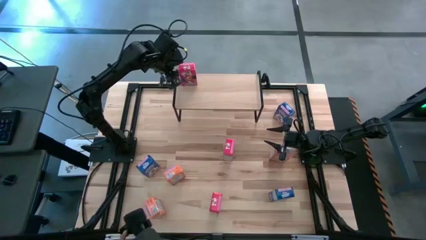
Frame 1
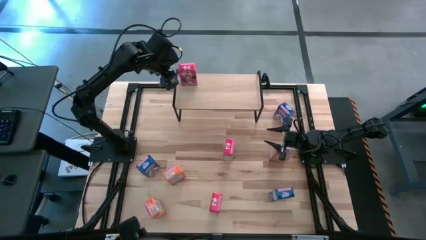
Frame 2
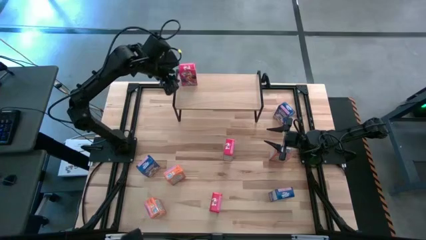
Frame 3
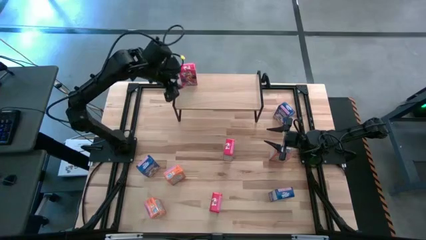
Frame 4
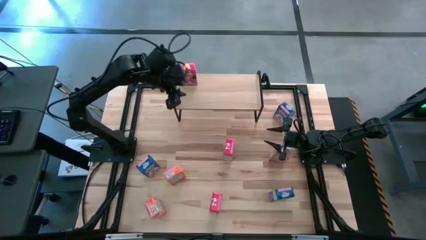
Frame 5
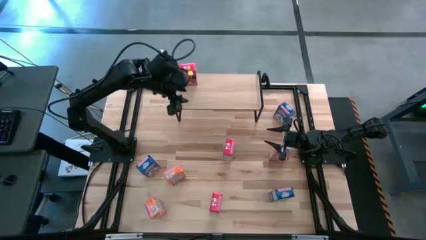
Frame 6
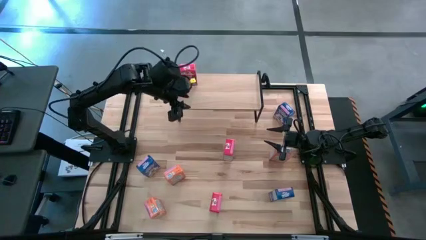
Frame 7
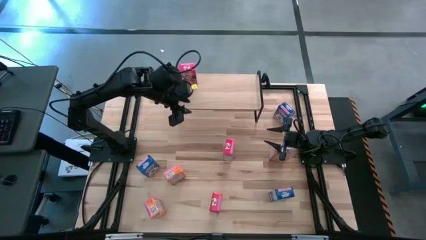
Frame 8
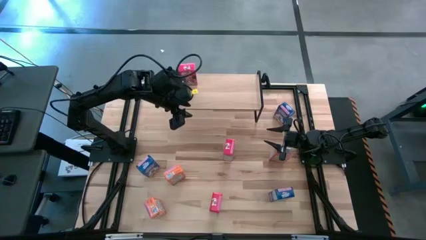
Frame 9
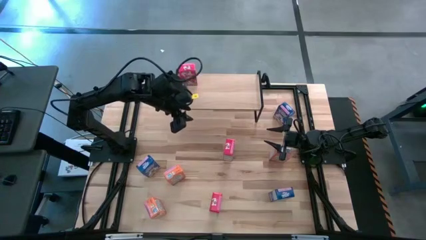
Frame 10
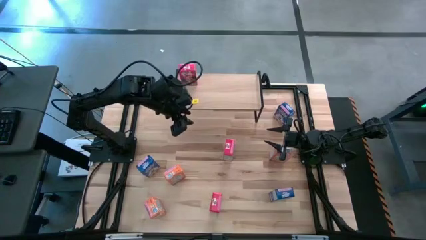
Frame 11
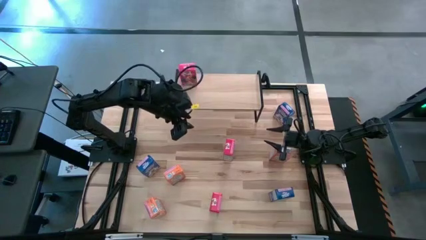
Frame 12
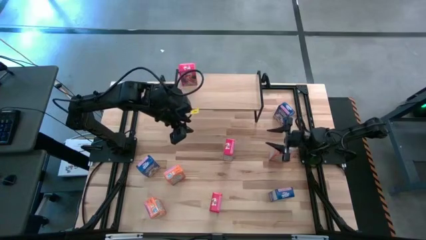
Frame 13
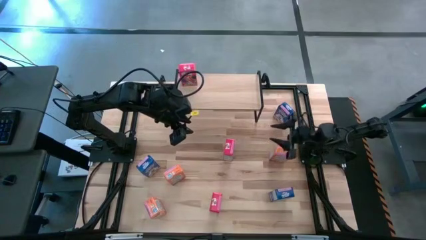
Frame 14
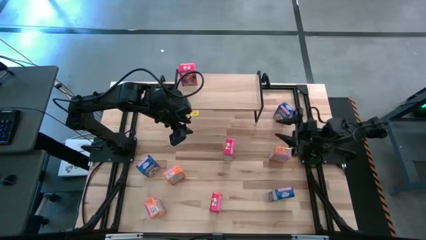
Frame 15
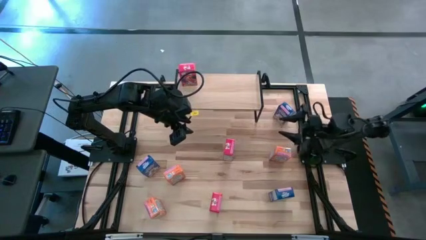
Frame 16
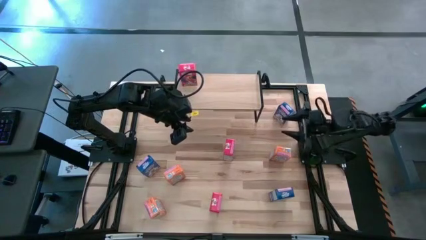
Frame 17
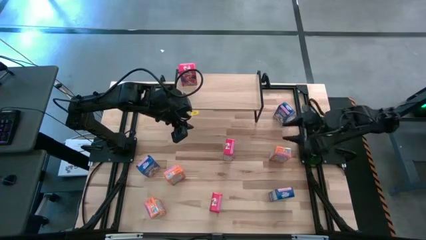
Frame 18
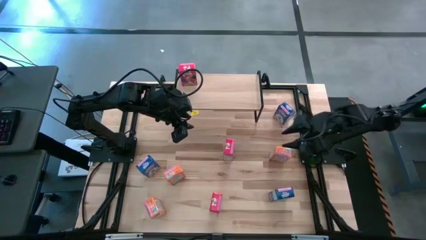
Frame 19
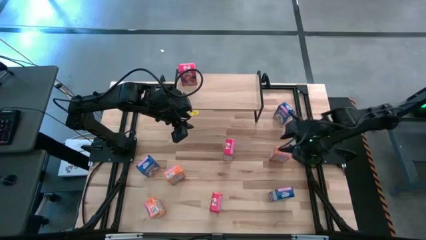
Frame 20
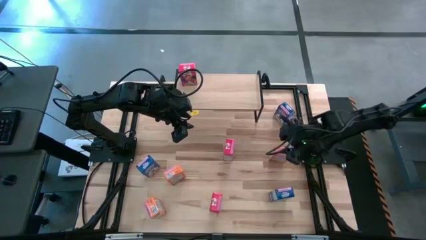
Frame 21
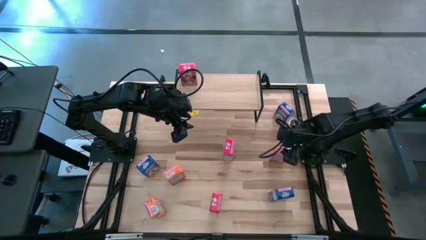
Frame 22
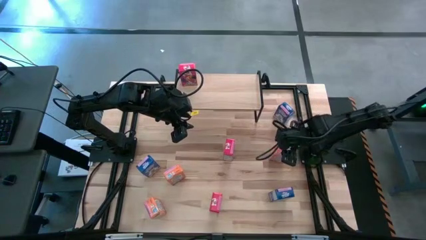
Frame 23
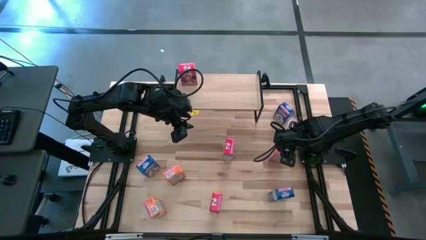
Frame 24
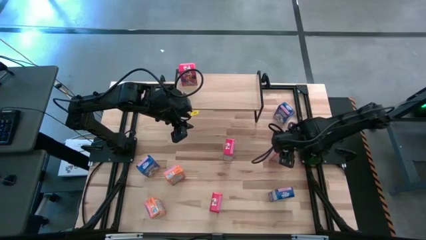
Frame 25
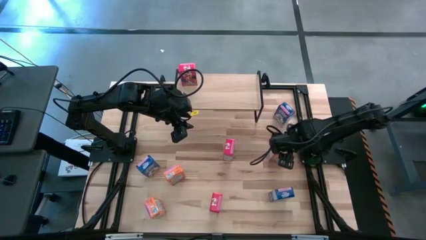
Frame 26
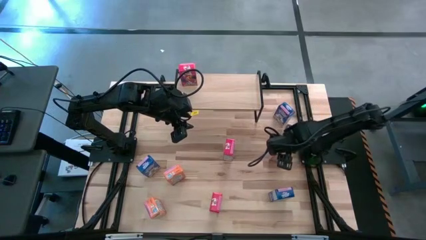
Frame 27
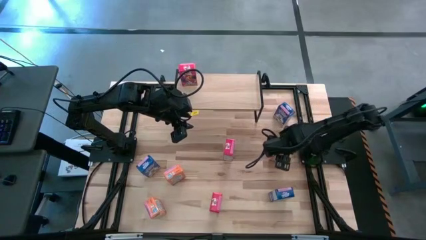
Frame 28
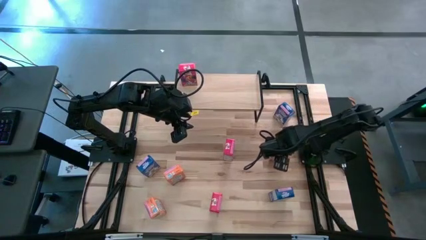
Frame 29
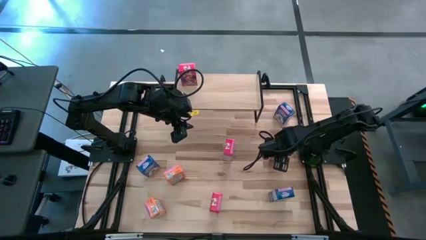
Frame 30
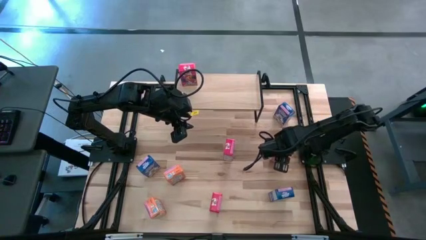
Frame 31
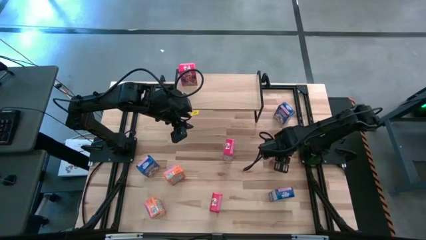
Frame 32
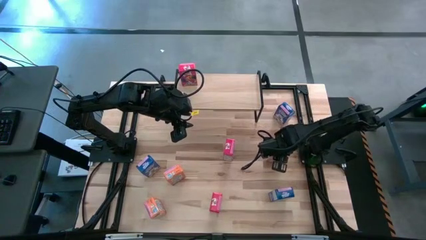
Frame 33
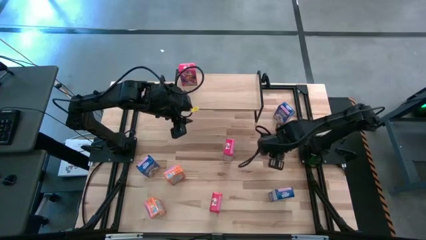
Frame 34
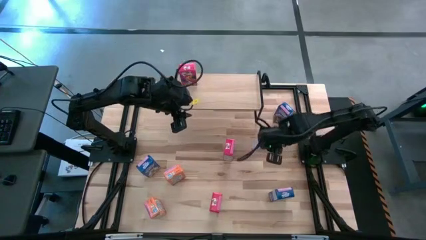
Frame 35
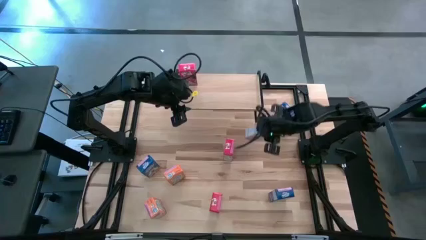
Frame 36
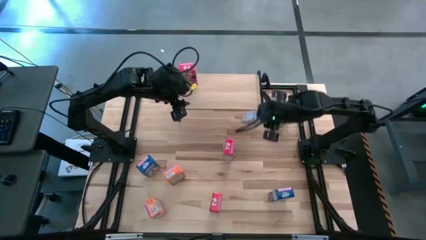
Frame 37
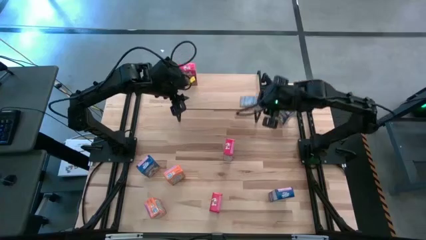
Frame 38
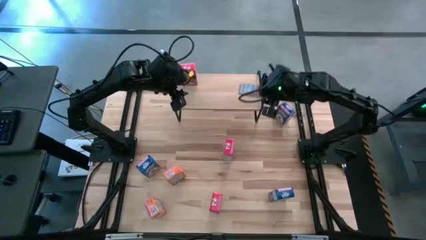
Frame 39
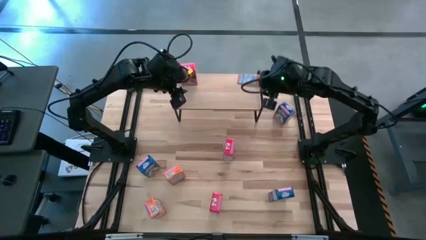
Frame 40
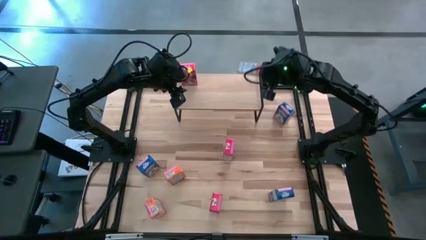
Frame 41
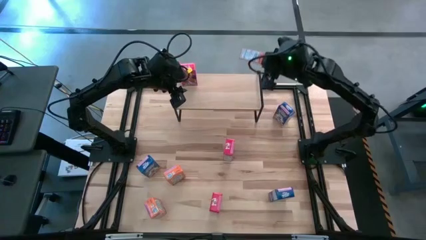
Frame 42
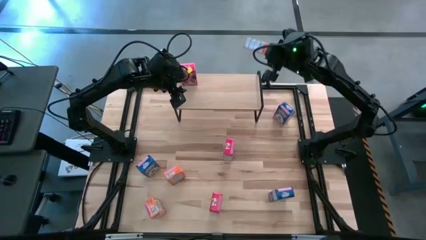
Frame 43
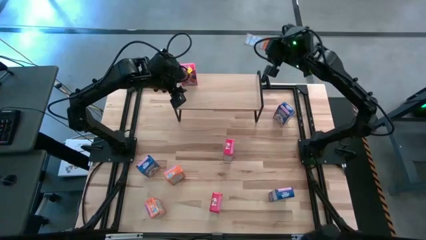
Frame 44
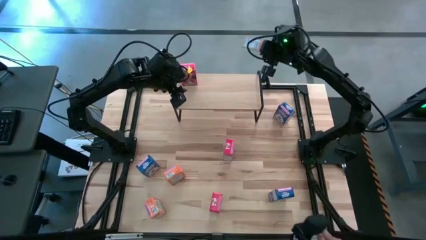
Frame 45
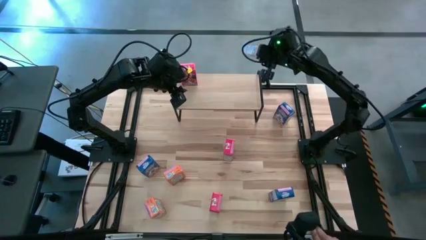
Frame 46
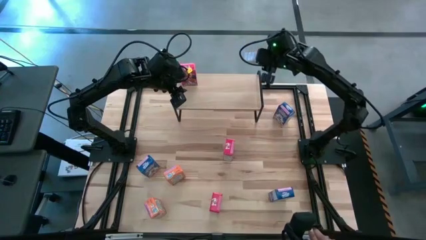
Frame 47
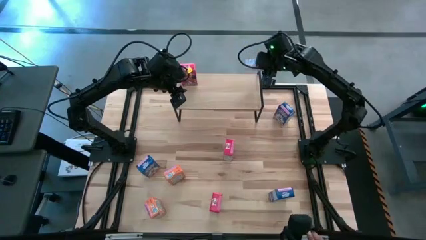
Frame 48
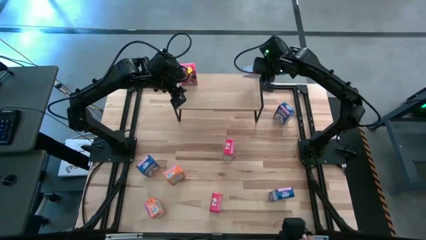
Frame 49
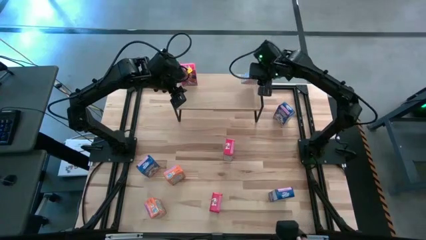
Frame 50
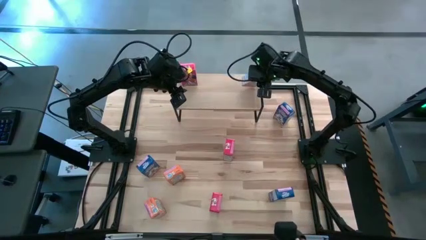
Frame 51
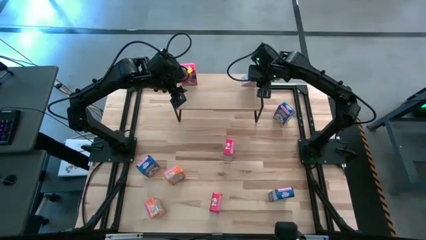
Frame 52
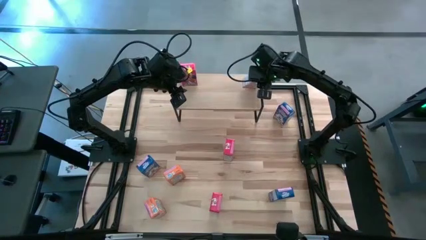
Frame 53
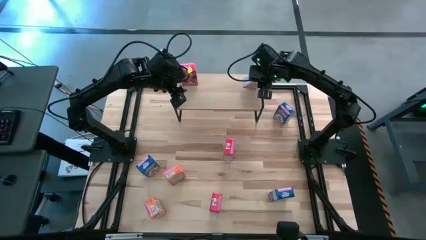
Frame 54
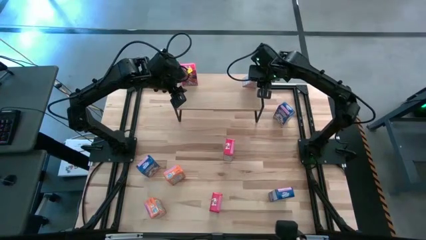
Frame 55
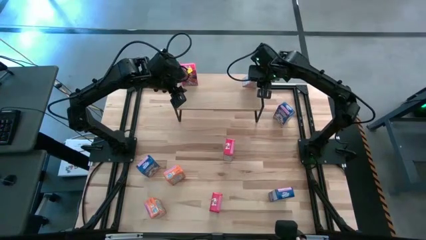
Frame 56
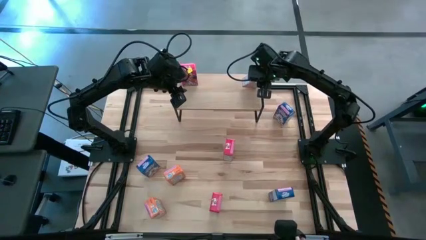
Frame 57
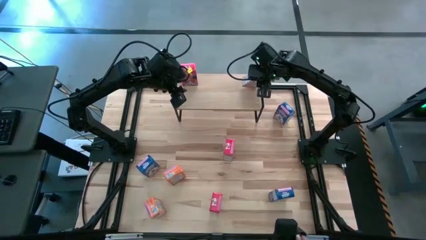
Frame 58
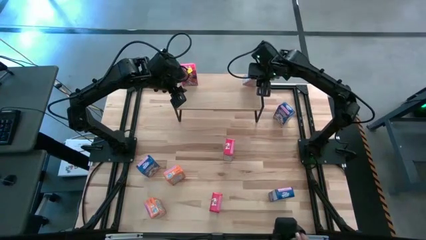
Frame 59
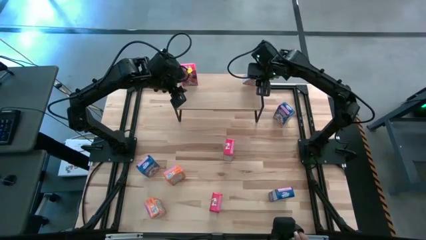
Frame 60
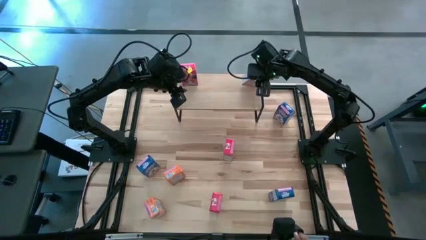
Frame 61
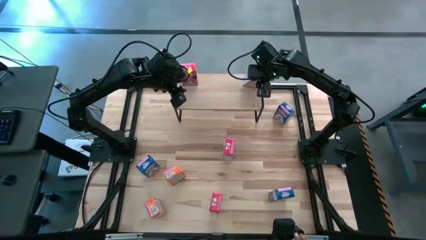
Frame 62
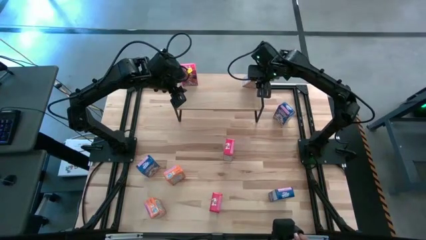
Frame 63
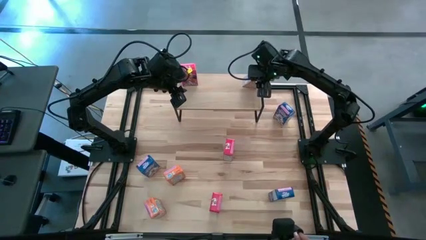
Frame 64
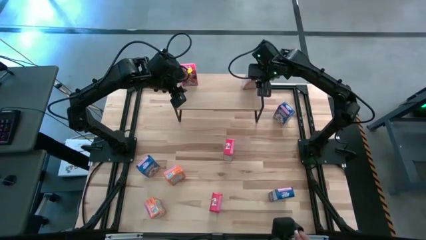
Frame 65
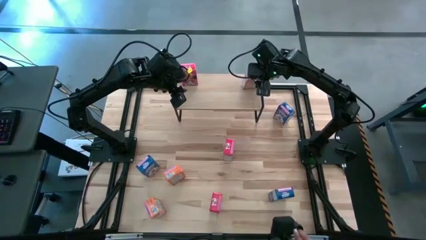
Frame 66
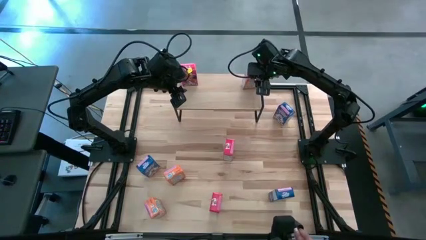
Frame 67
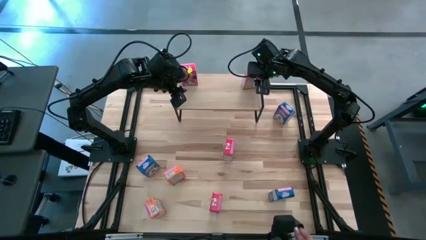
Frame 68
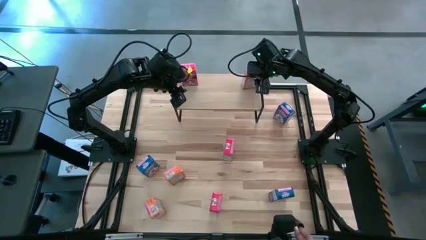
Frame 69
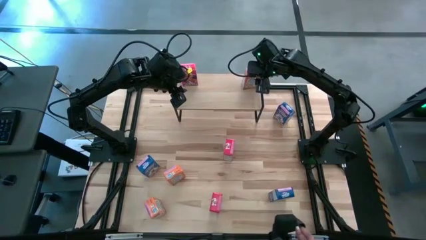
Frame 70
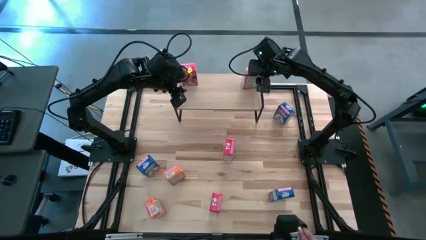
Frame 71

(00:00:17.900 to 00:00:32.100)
Task: Stack cereal on shelf
Put the top orange cereal box on the shelf
